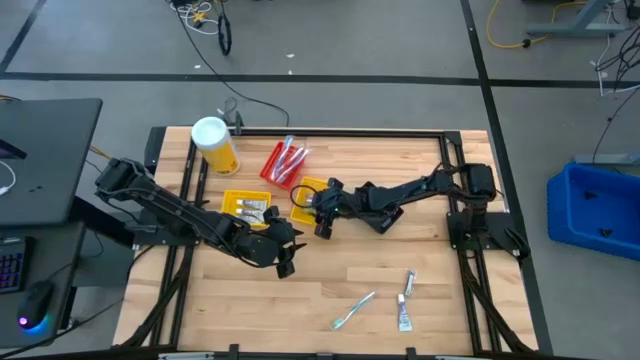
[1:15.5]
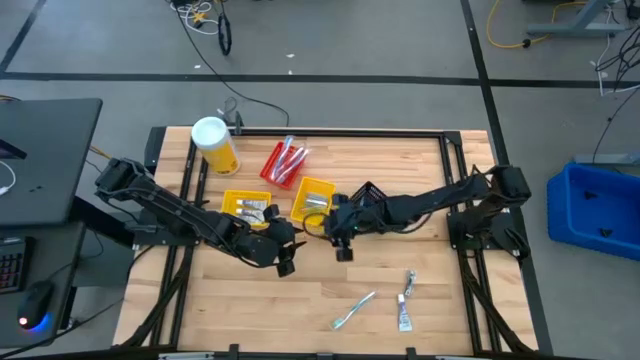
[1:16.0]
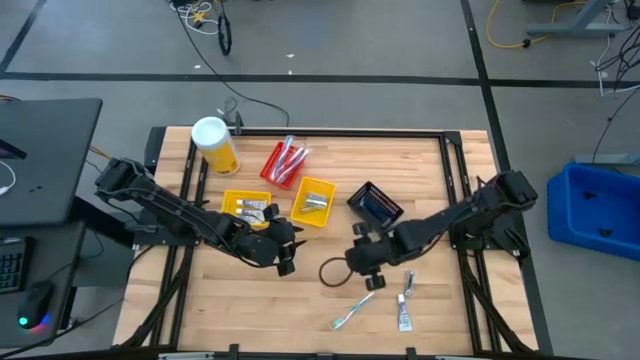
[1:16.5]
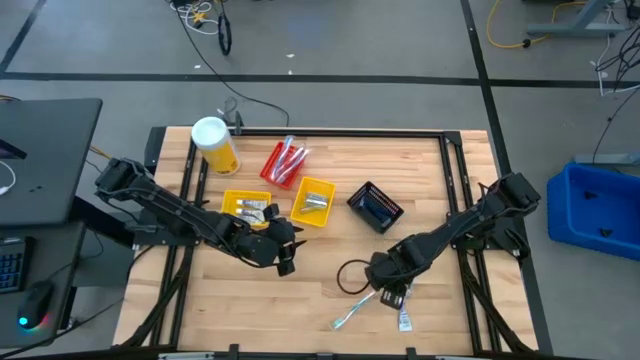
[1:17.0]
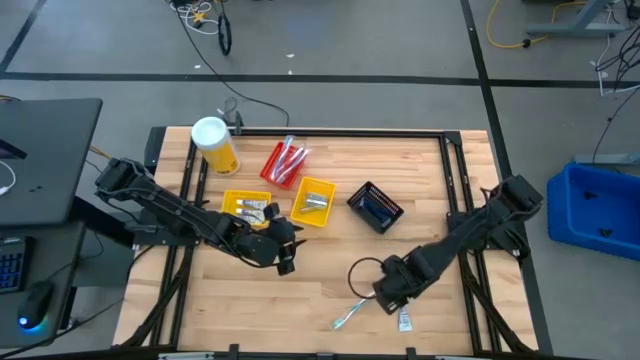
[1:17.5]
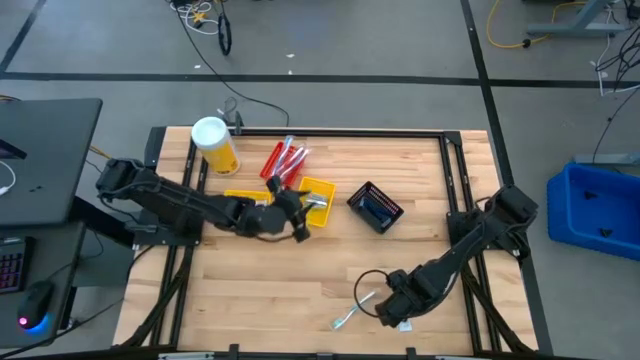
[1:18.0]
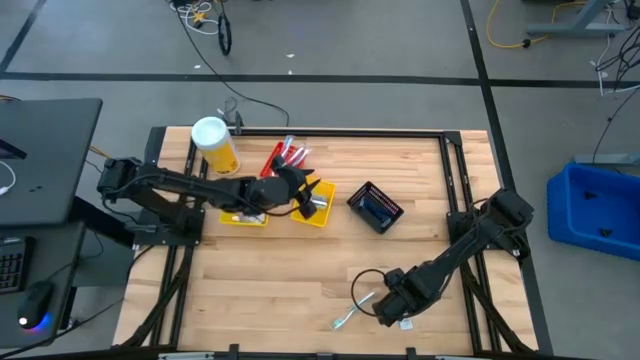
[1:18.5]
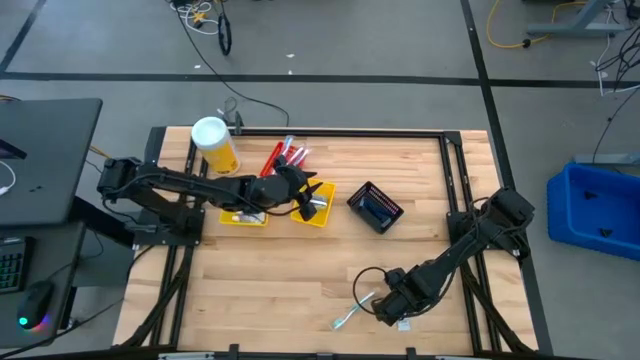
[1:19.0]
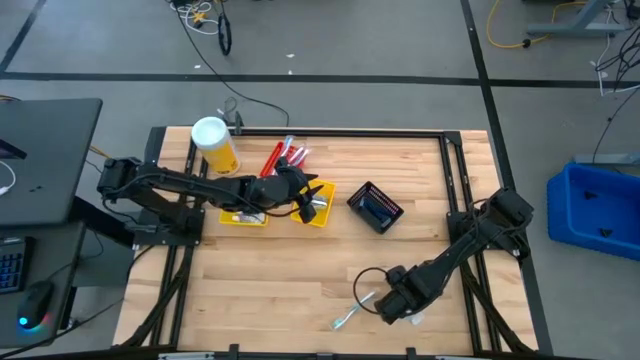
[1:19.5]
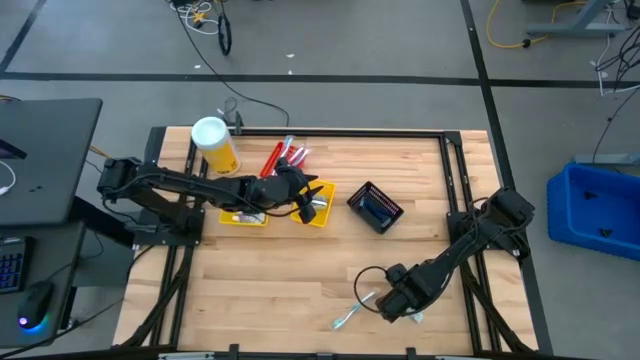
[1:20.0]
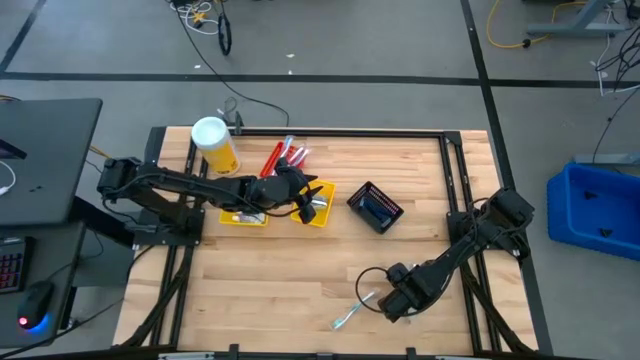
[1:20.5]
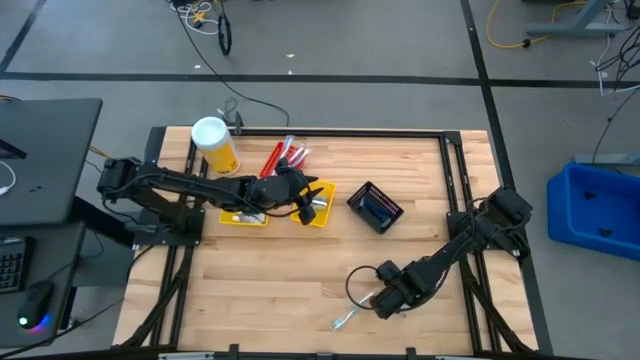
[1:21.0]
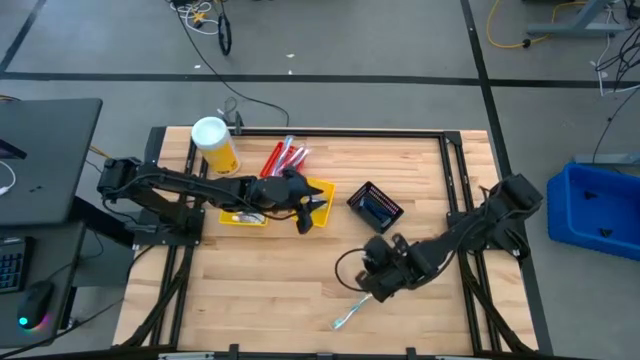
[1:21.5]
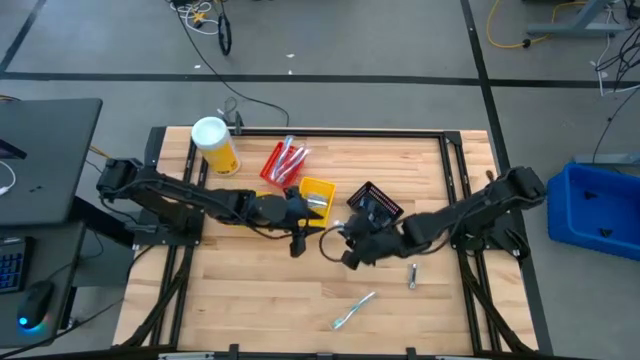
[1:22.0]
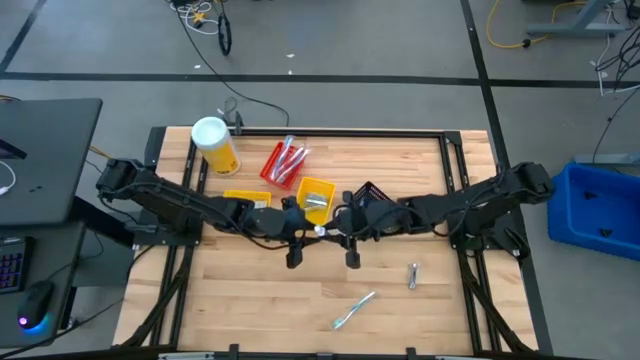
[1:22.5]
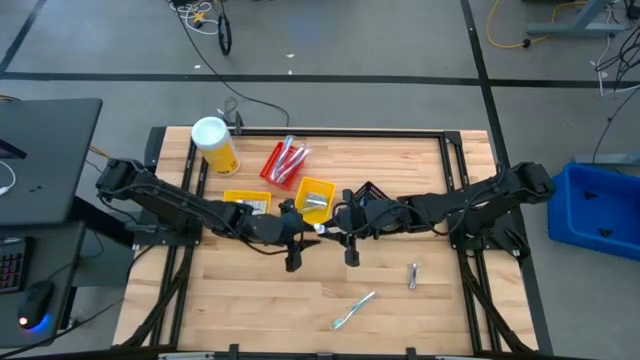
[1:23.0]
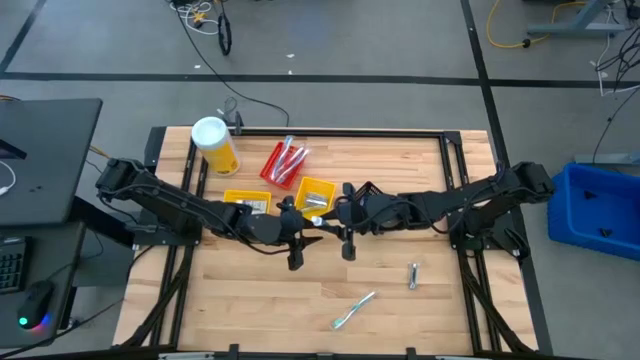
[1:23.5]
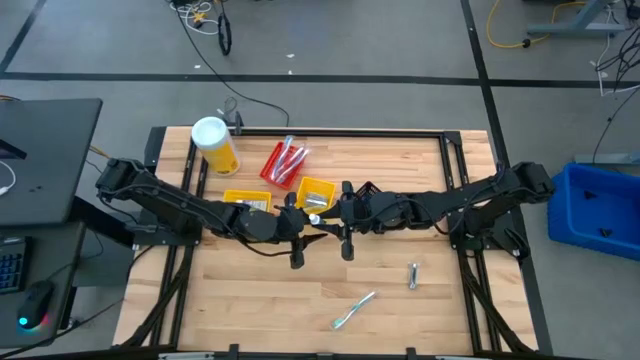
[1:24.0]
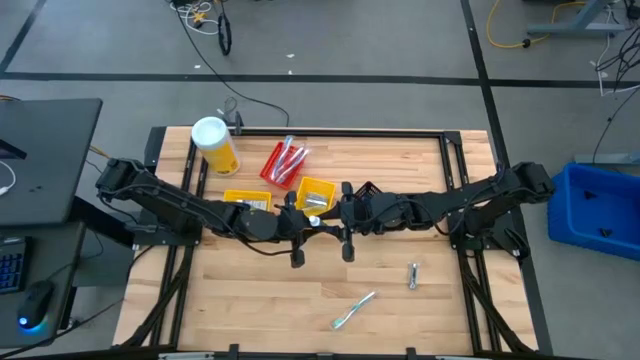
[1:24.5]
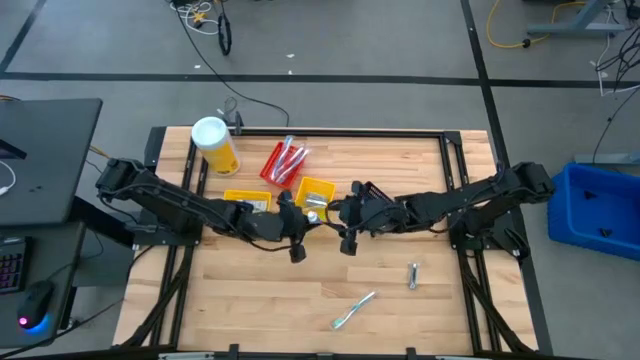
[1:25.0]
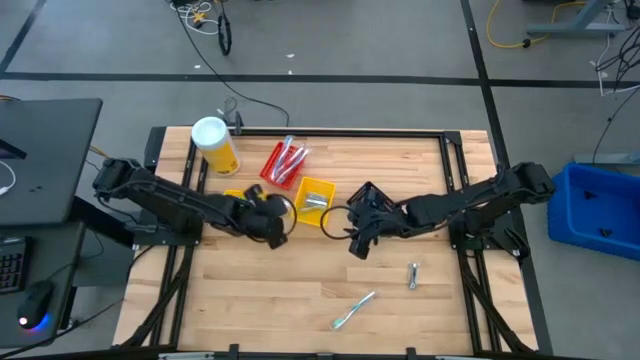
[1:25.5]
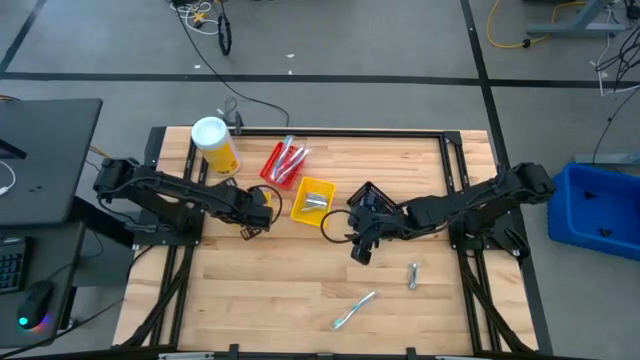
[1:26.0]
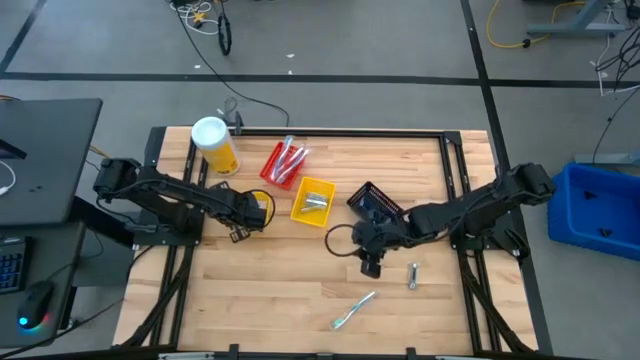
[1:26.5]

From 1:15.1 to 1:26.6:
Task: Pick & Place Travel size toiletries
Put the white toothpaste into the left yellow bin

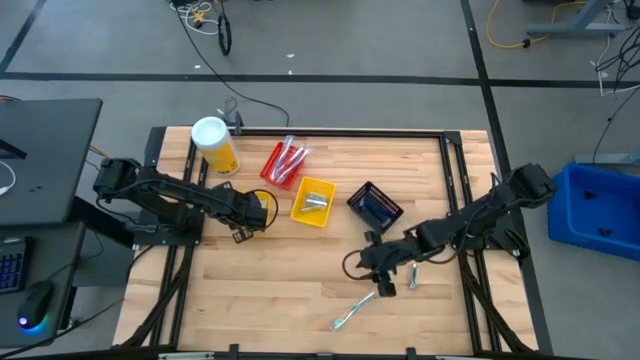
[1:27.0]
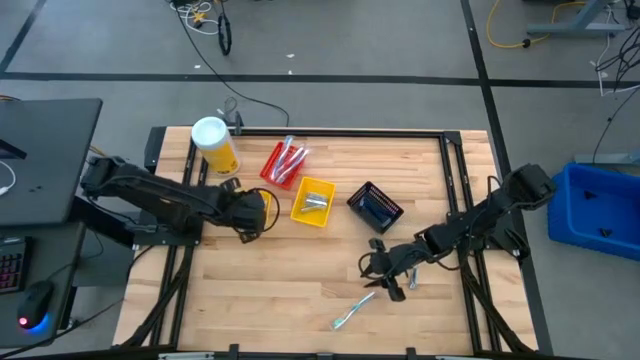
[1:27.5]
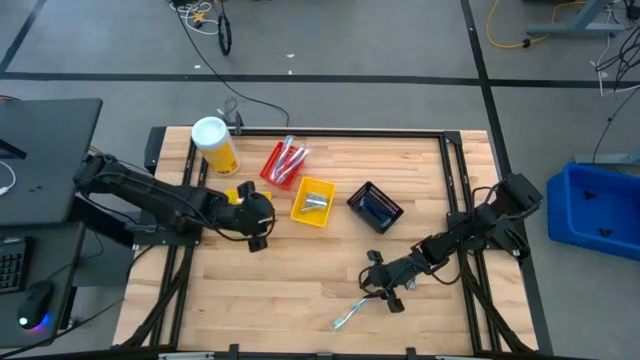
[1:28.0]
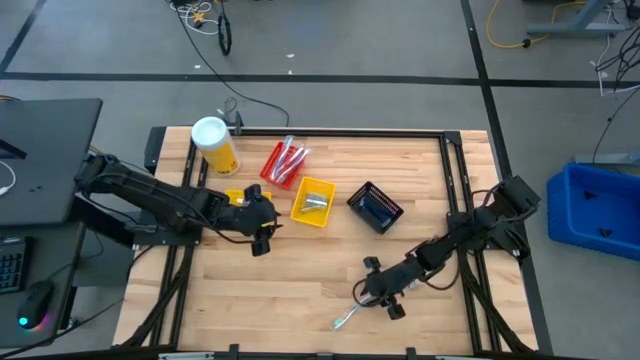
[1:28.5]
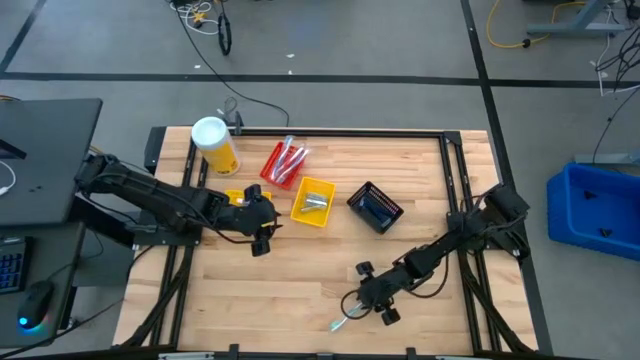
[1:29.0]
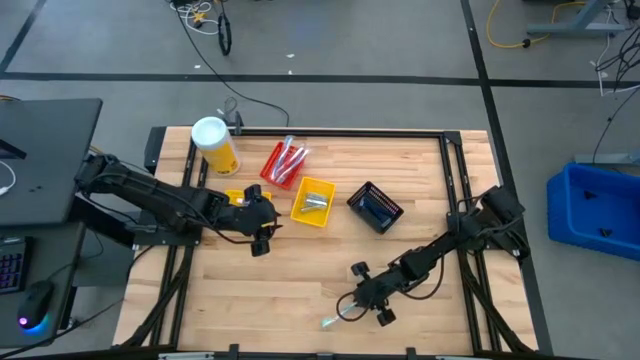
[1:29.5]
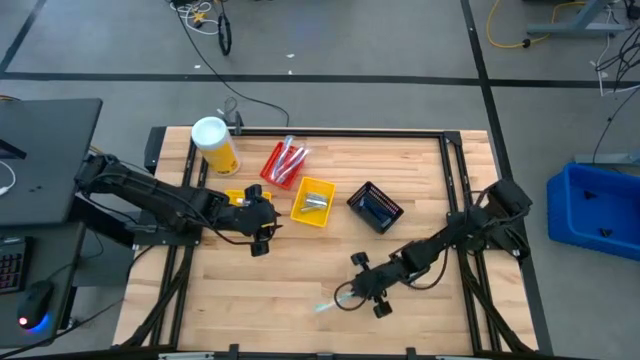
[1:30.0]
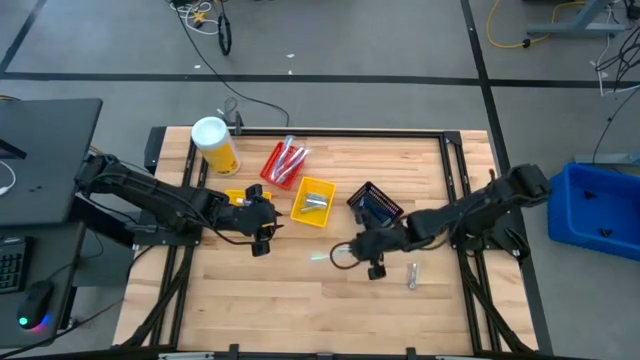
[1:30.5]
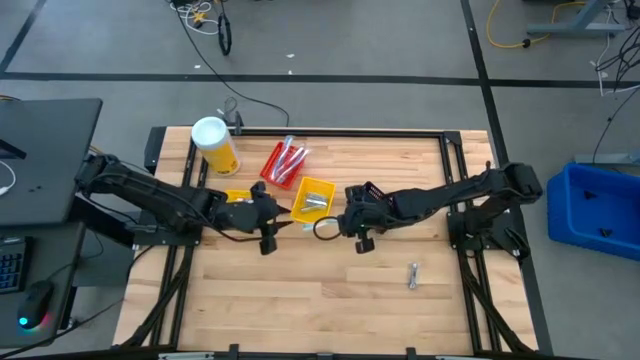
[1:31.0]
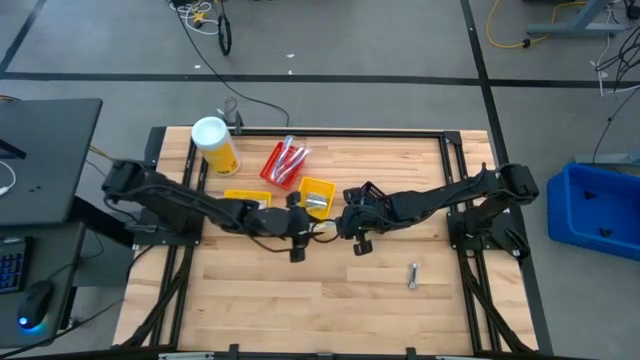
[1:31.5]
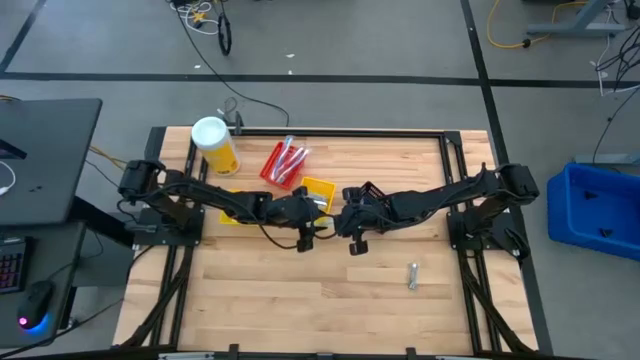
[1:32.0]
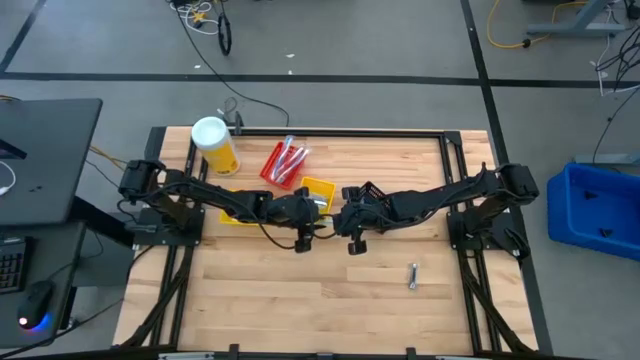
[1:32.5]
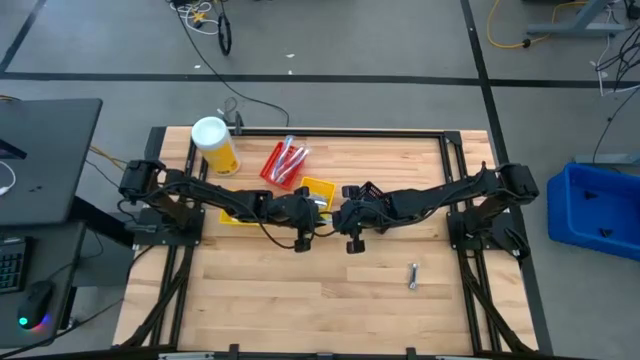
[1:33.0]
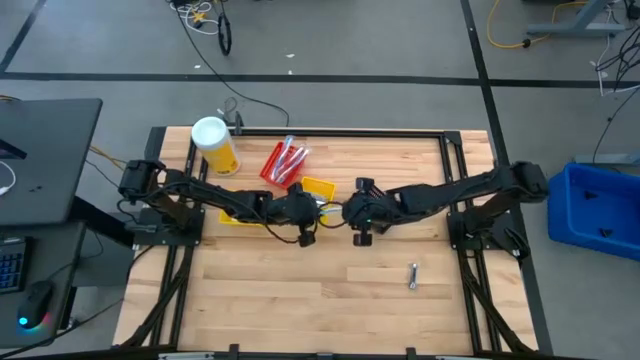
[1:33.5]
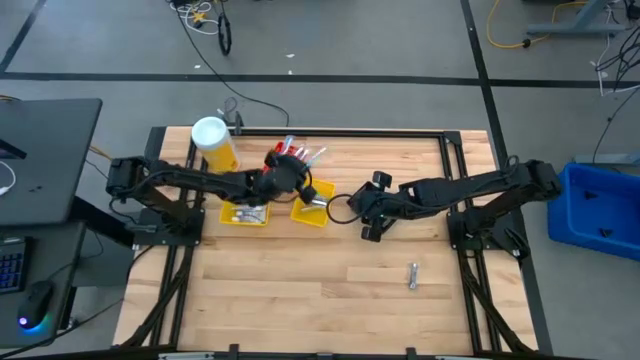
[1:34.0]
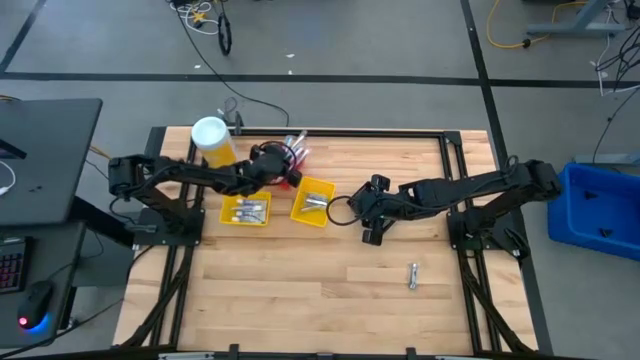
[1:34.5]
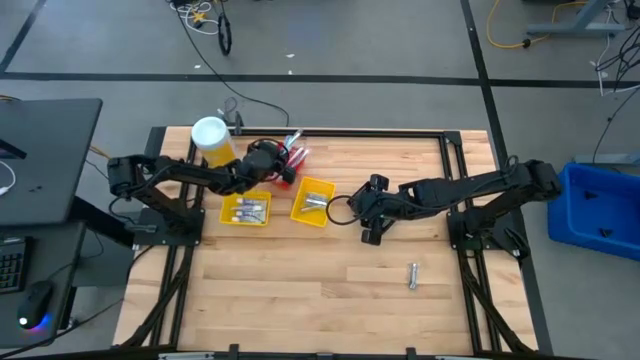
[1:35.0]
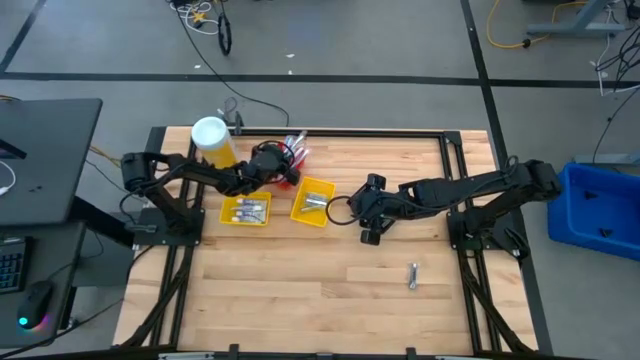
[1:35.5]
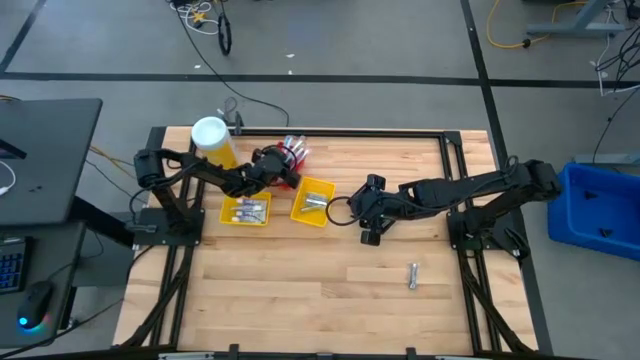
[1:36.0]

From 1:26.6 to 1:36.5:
Put the green toothbrush into the red bin

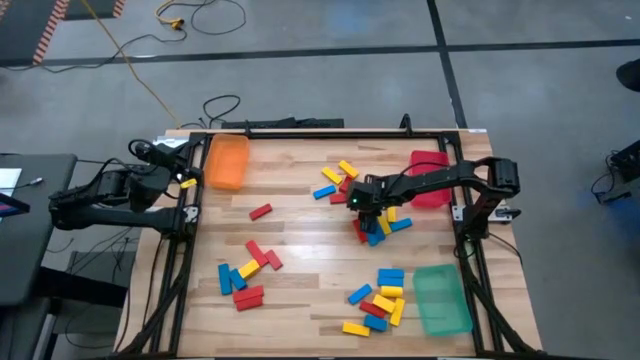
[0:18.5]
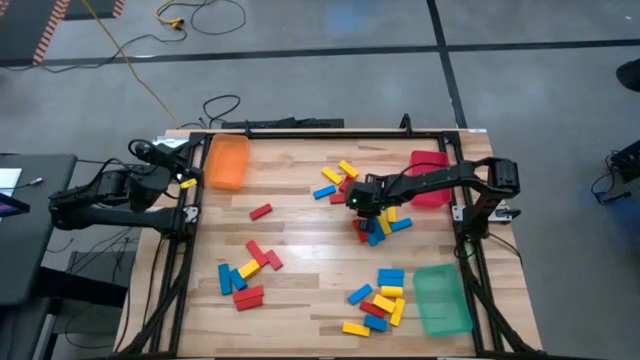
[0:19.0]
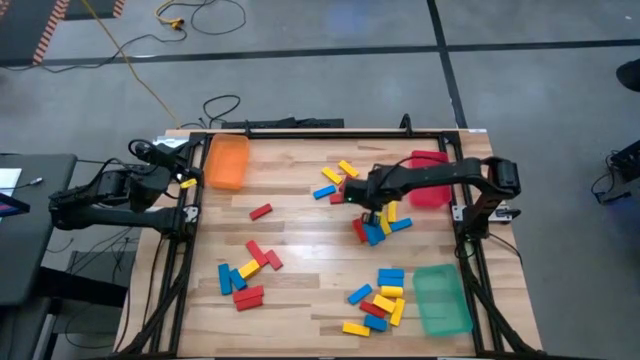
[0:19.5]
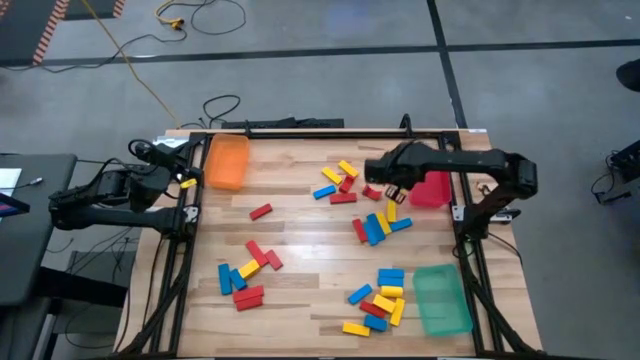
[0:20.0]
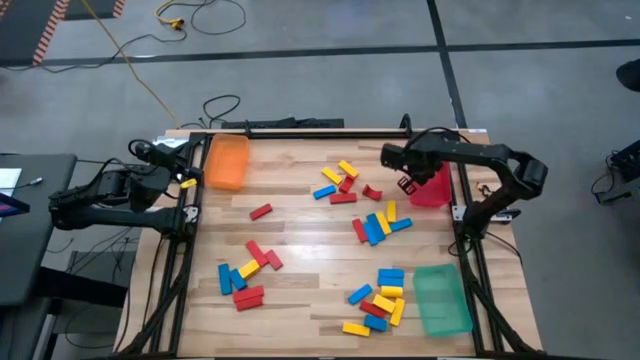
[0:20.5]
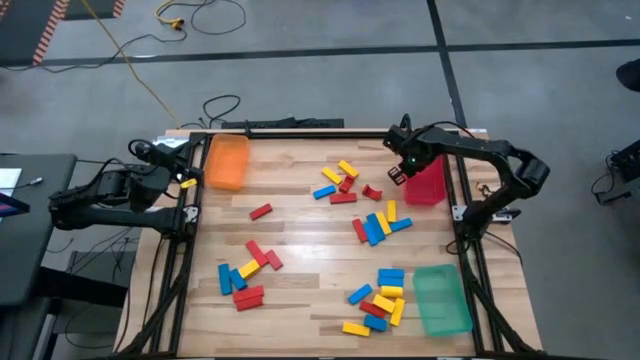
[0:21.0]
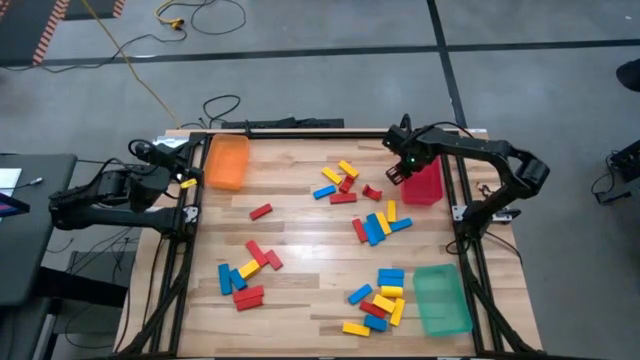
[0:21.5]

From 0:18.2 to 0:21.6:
Task: Sort blocks
Put the yellow square block into the red bin
